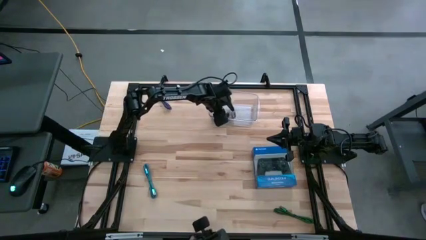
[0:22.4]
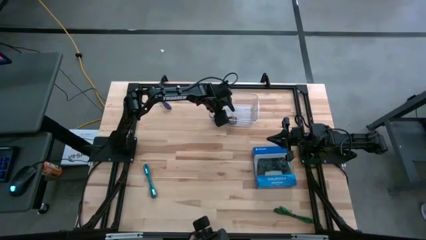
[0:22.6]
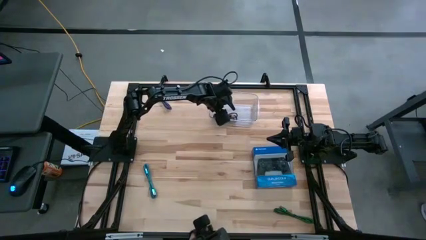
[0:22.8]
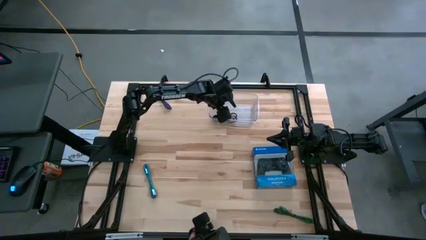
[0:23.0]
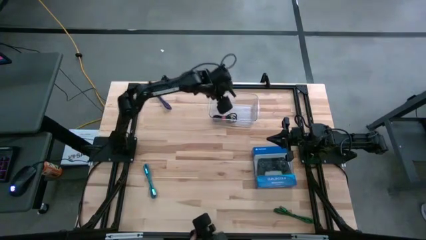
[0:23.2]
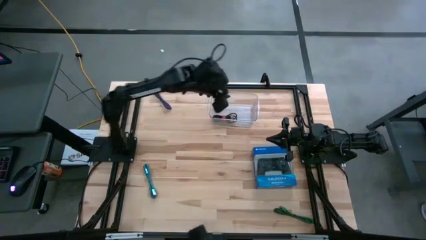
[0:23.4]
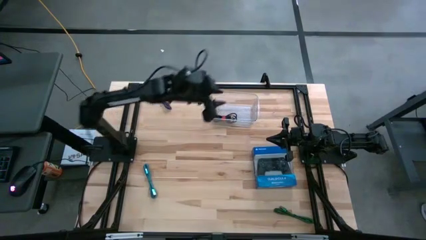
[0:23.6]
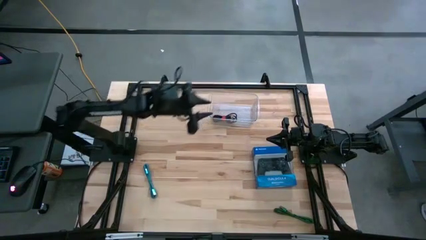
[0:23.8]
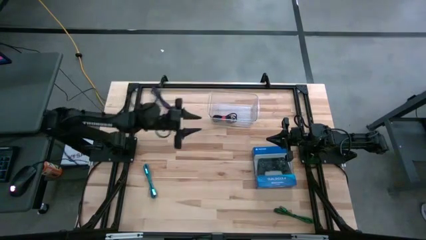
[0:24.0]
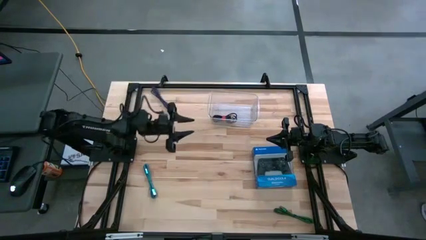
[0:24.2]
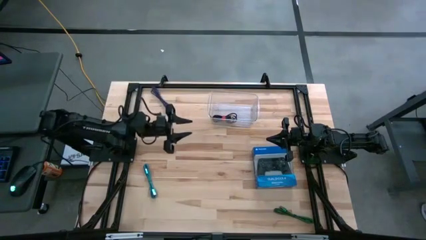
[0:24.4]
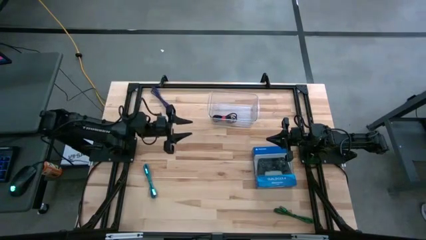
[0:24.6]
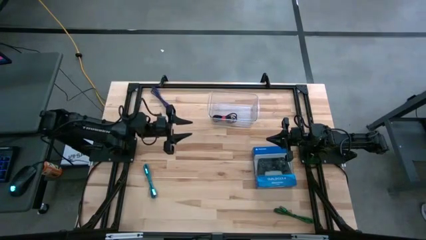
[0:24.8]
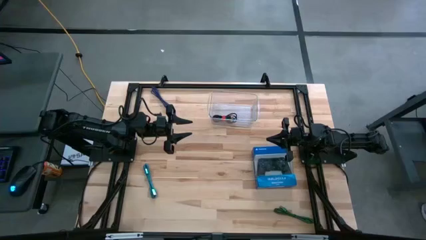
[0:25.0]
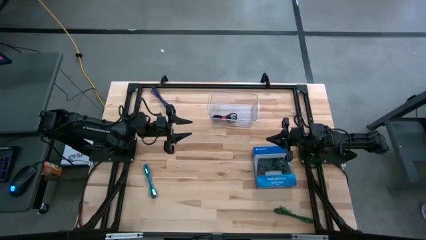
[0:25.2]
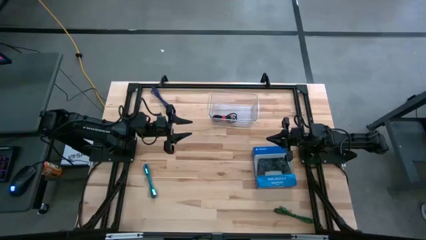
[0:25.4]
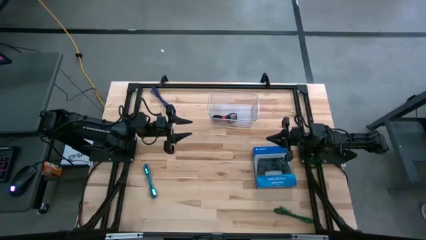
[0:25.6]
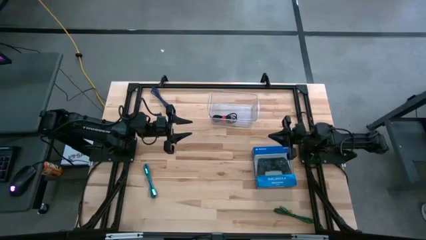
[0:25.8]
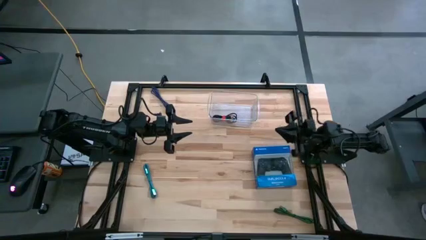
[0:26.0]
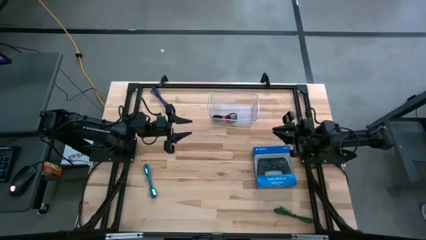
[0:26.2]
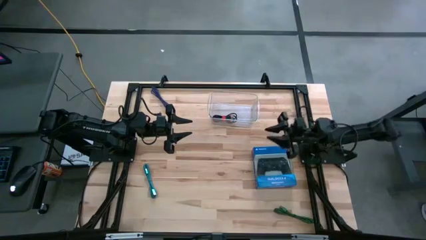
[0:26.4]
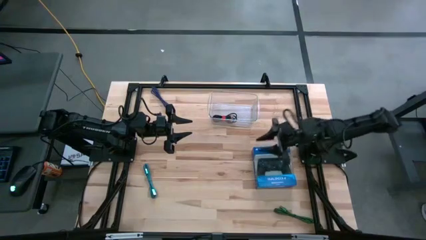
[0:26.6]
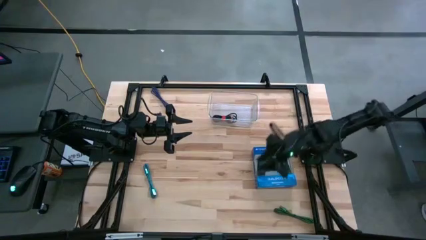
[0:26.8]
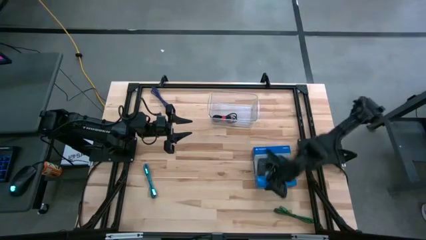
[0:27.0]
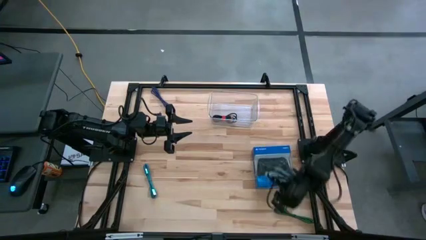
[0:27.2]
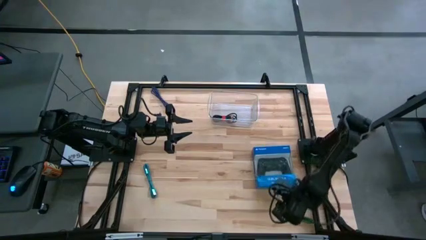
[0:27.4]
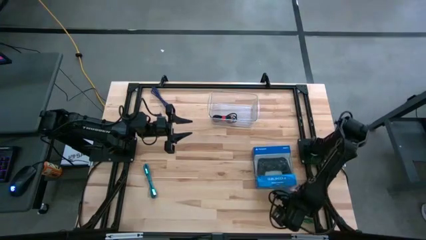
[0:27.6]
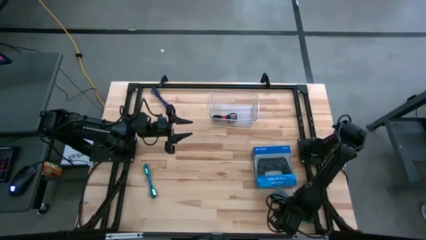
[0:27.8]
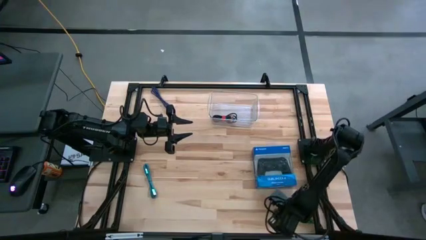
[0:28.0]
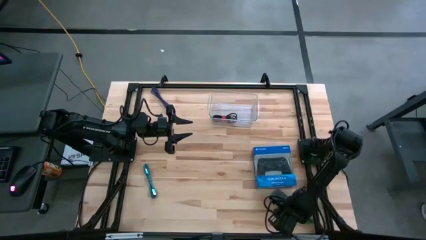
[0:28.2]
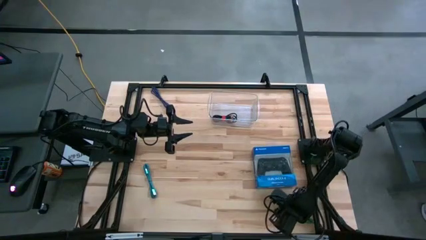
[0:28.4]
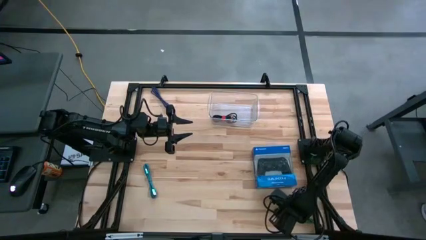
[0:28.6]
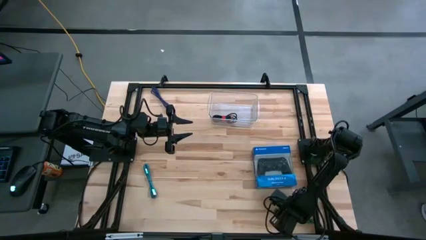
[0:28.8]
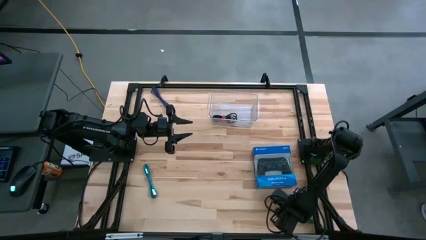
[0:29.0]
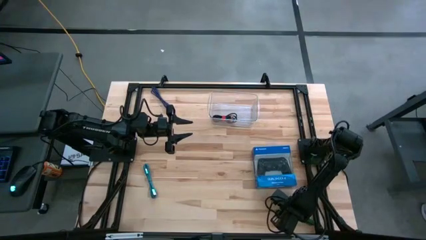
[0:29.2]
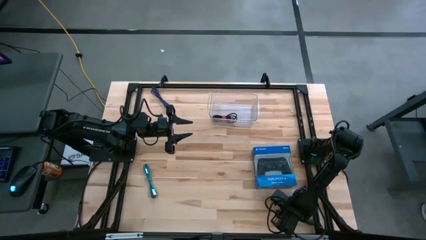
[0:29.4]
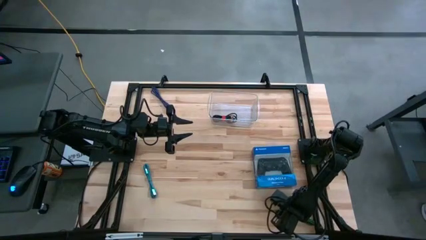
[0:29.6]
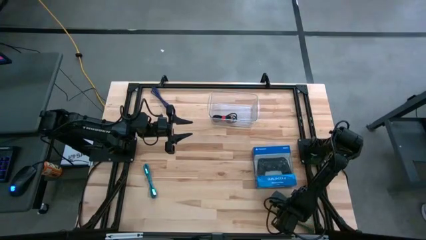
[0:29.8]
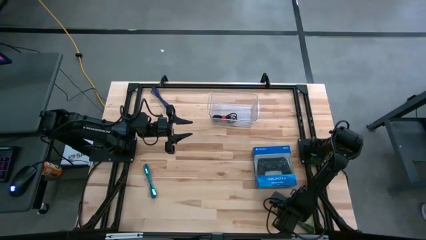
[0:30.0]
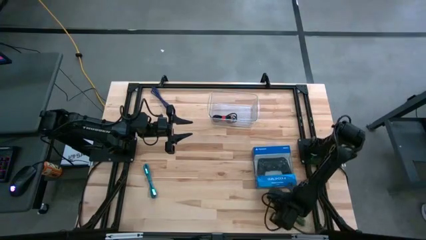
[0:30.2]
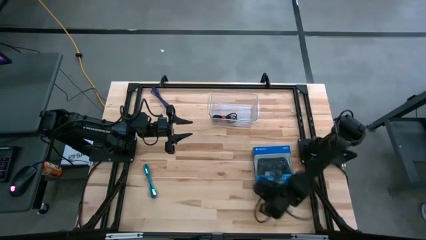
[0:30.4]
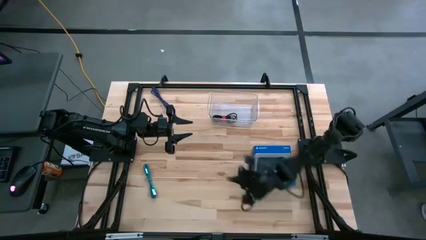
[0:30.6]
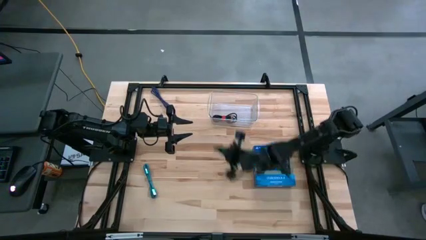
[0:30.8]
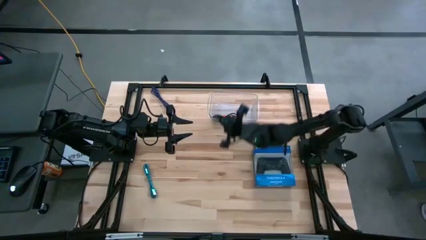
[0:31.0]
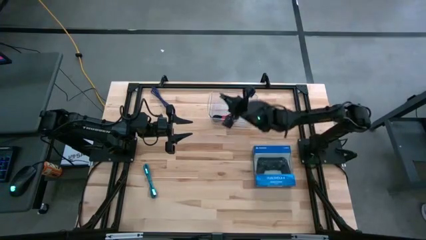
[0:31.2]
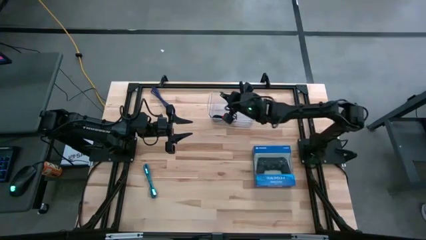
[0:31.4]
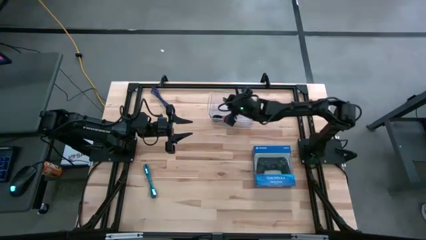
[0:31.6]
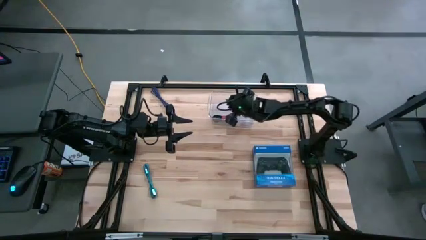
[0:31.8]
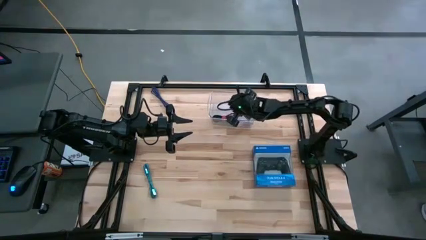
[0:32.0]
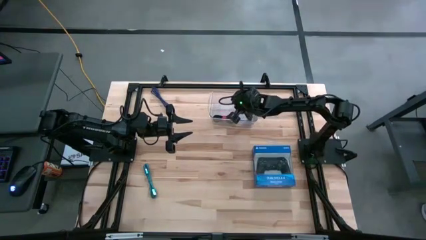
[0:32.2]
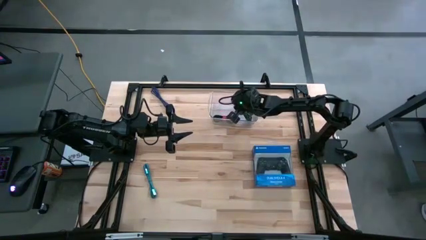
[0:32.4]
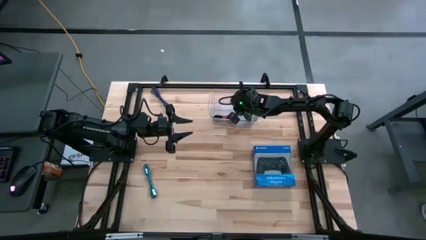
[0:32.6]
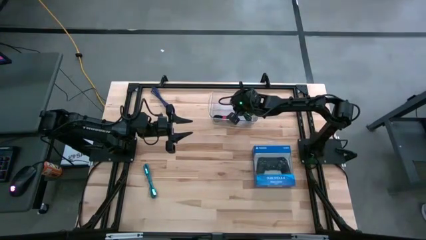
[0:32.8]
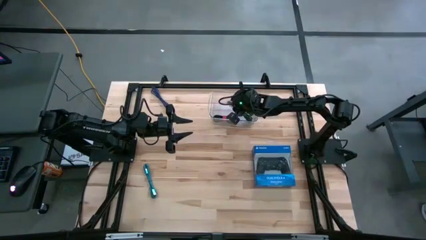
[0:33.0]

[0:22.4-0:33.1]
Task: Pick and place USB-C Cables
Put the green charger cable into the bin

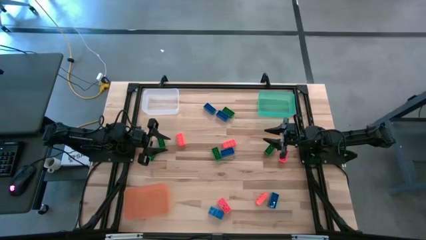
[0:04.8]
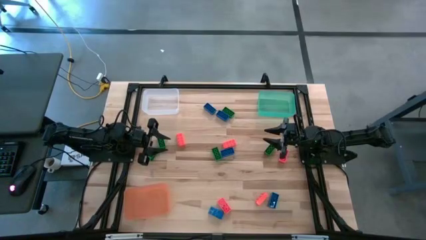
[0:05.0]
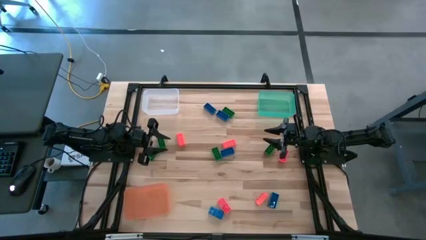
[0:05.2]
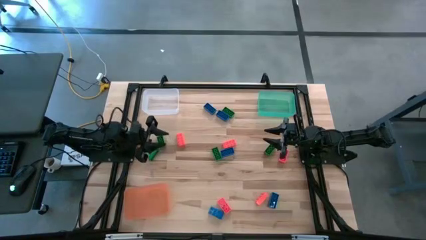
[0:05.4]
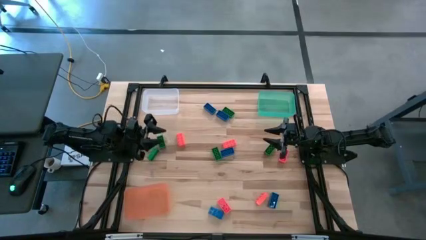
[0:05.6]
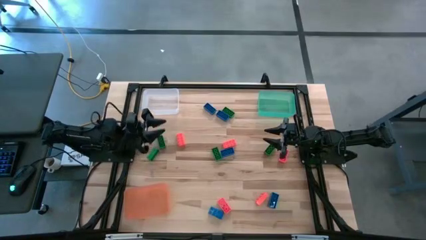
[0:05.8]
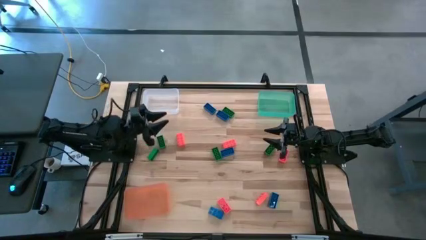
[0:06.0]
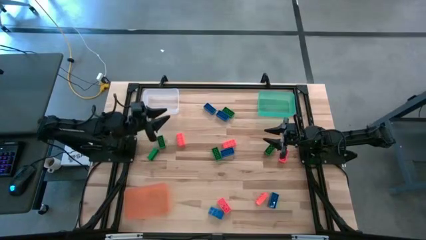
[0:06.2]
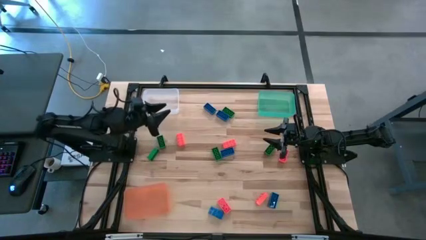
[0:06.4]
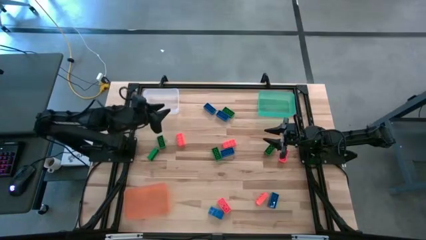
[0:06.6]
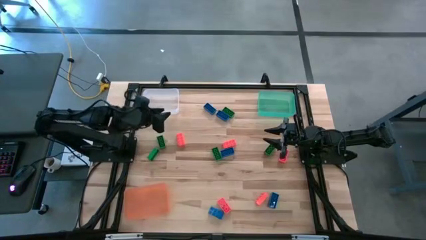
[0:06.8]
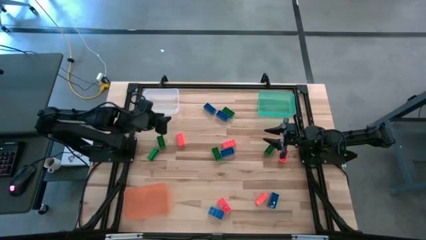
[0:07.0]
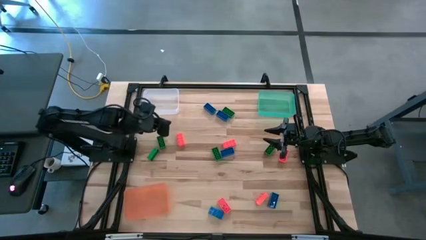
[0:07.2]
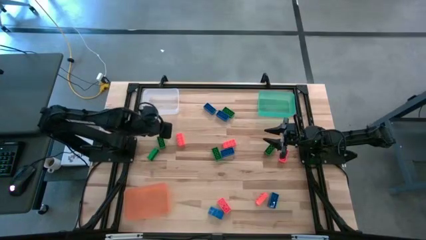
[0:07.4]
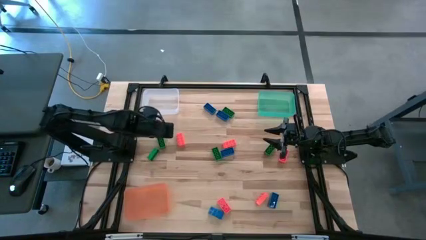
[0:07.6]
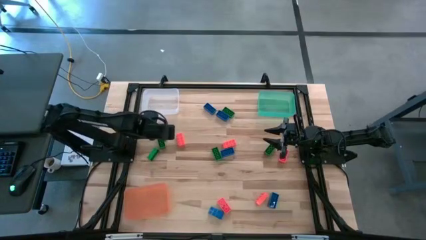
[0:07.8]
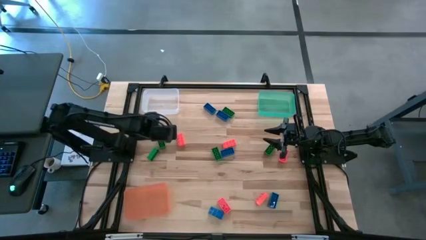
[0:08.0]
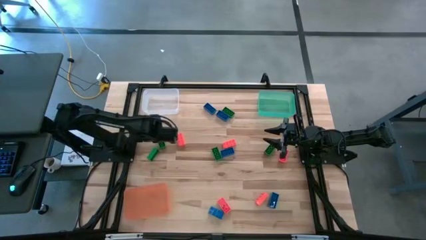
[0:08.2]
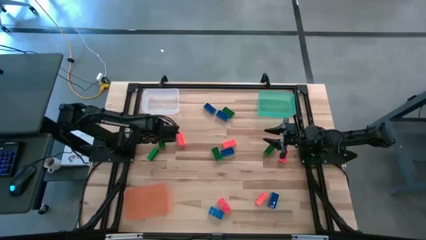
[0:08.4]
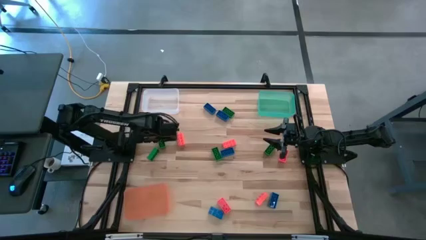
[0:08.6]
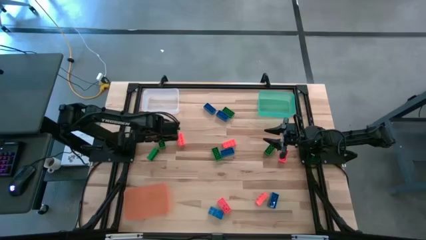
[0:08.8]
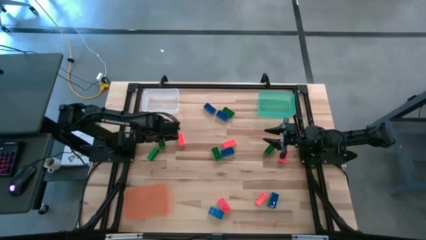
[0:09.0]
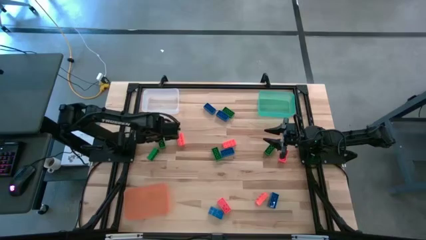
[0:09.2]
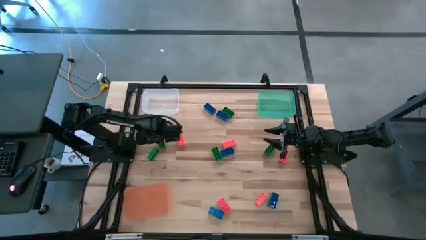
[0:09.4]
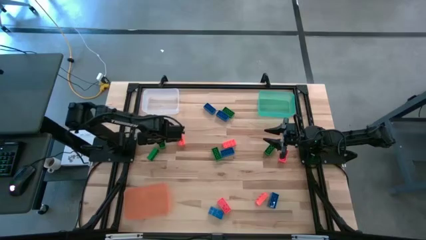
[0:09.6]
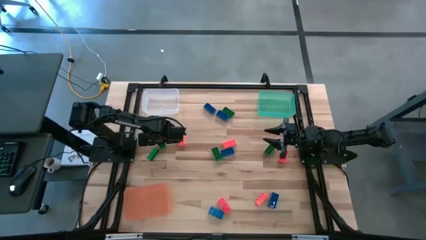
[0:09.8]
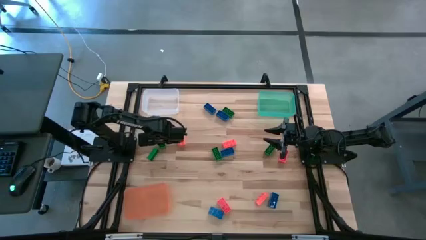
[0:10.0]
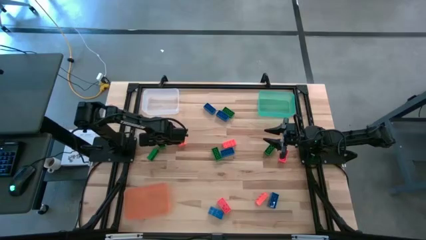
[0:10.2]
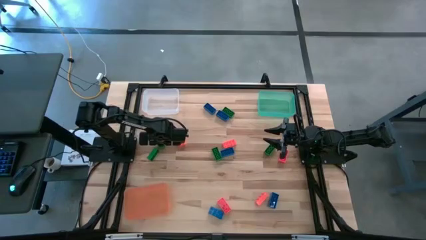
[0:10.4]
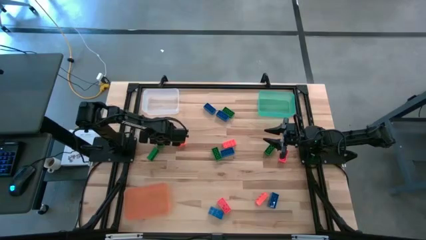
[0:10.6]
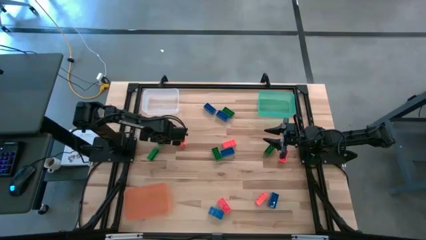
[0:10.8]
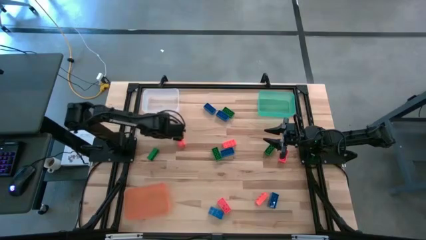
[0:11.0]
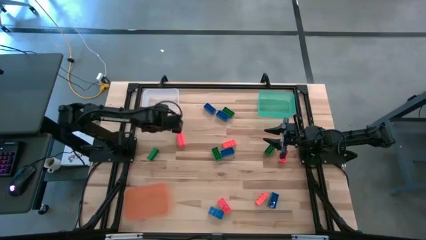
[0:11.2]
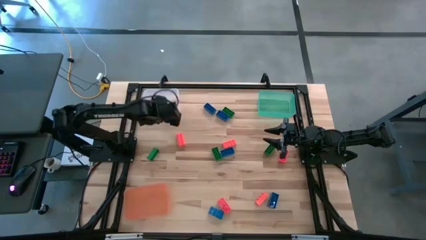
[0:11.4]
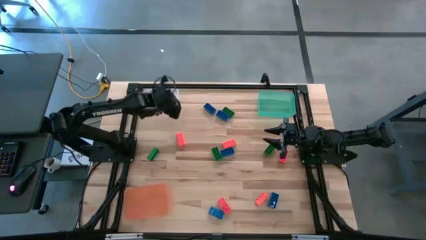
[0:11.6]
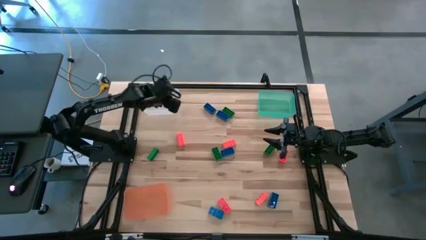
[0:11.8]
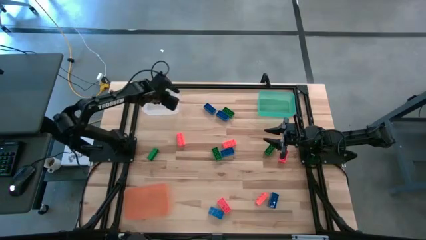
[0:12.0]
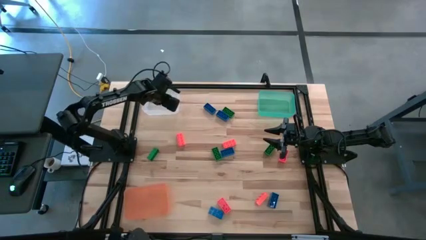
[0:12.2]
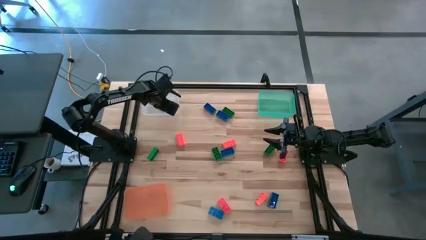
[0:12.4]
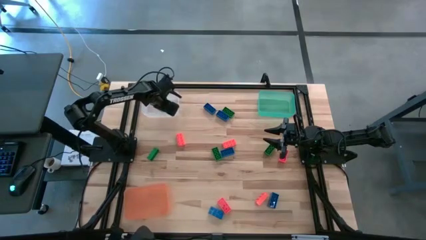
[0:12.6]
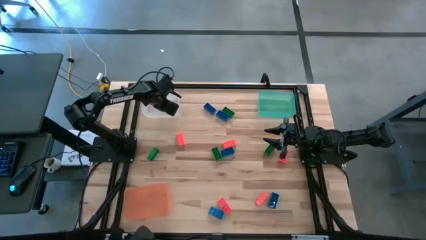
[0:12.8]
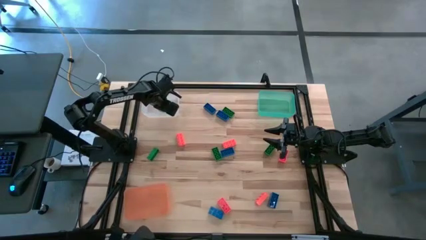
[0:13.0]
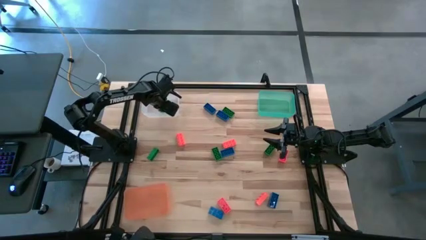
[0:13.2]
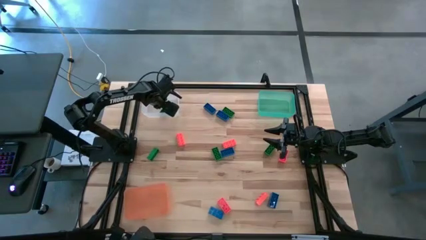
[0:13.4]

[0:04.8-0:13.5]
Task: Sort & place blocks by color
Put the green game piece into the transparent bin
